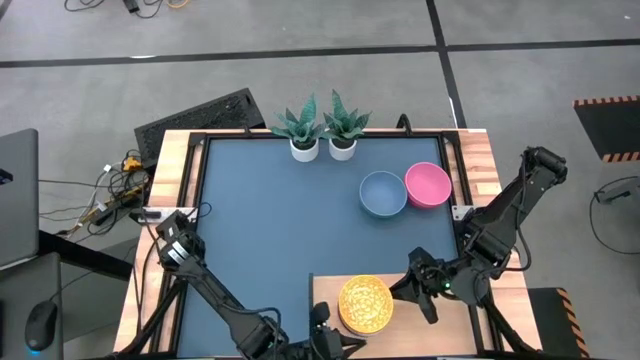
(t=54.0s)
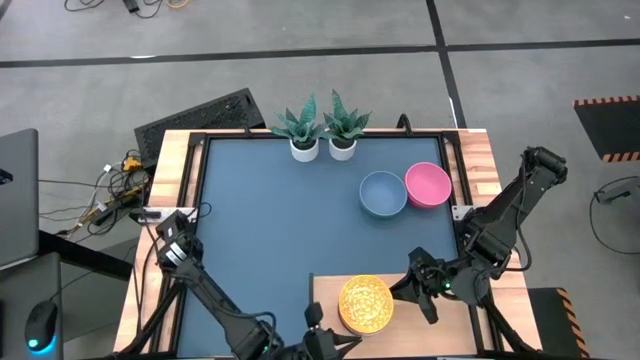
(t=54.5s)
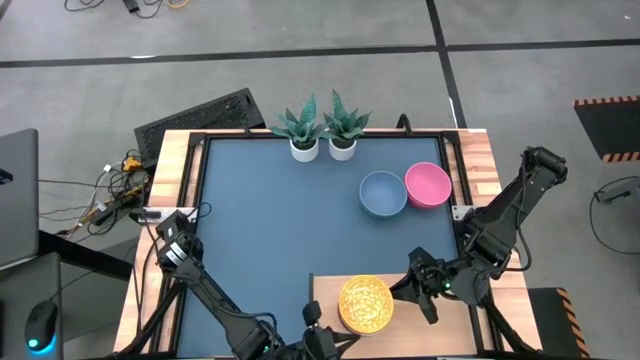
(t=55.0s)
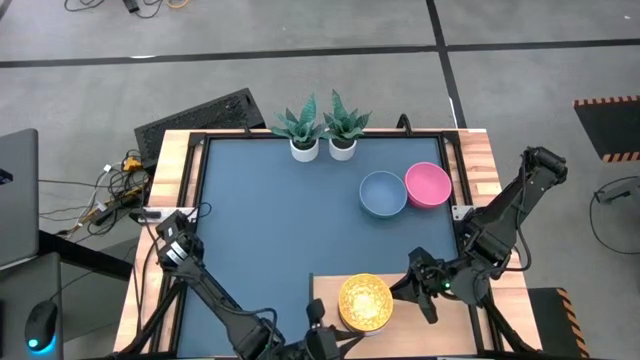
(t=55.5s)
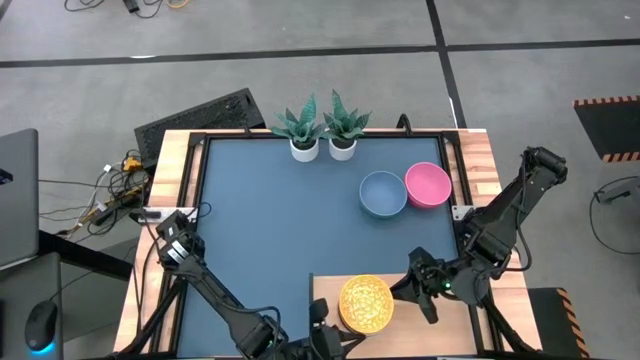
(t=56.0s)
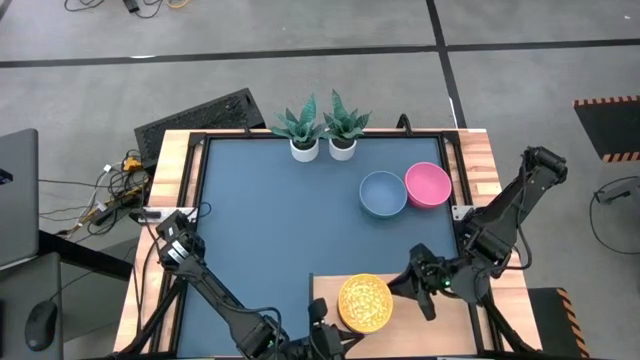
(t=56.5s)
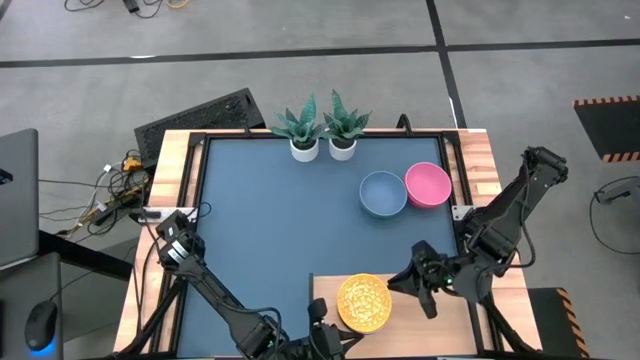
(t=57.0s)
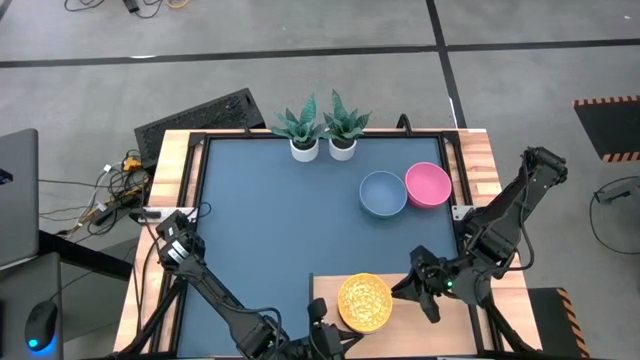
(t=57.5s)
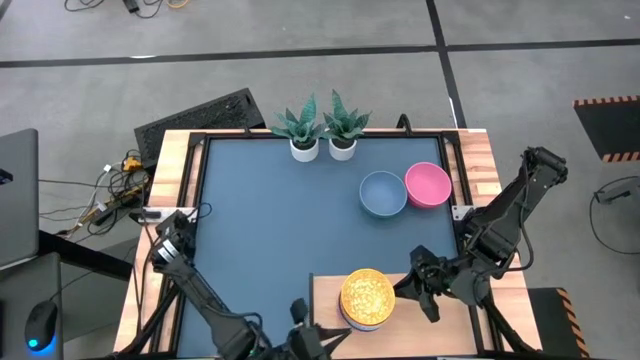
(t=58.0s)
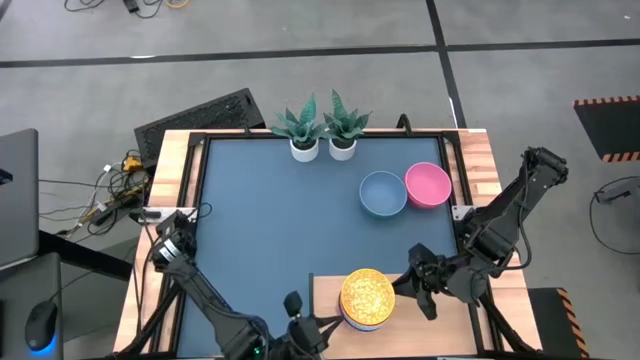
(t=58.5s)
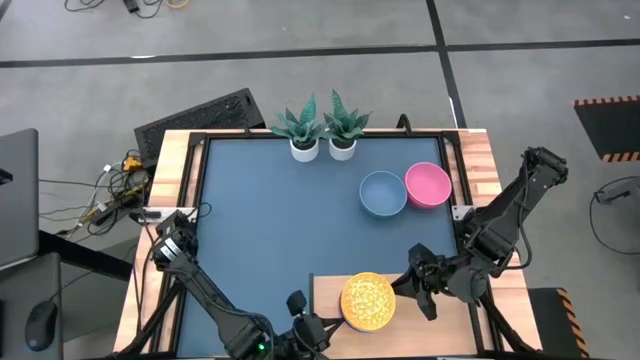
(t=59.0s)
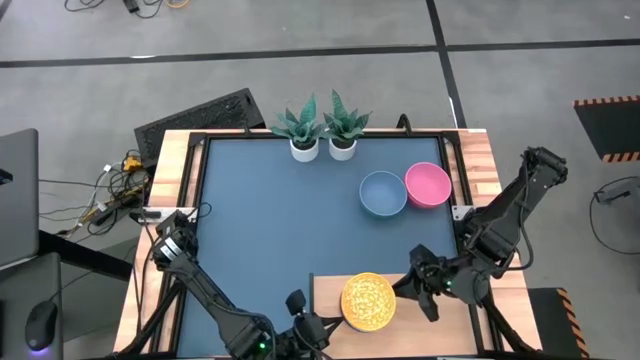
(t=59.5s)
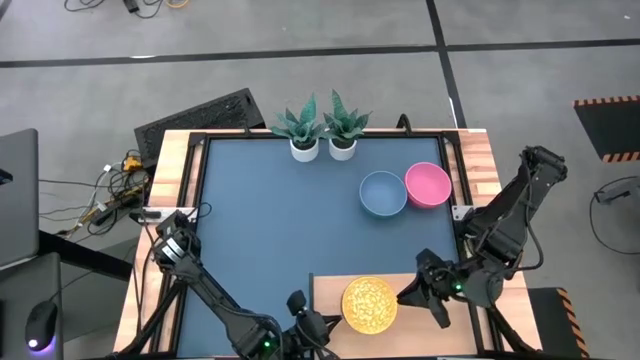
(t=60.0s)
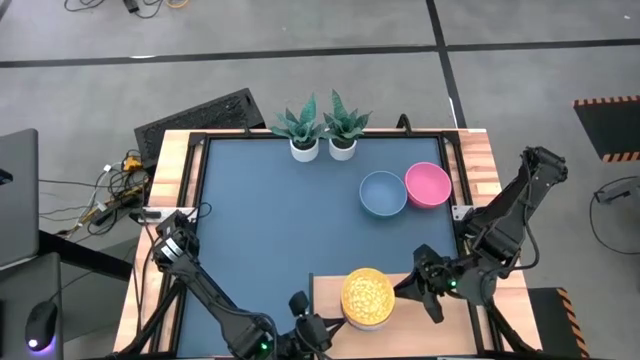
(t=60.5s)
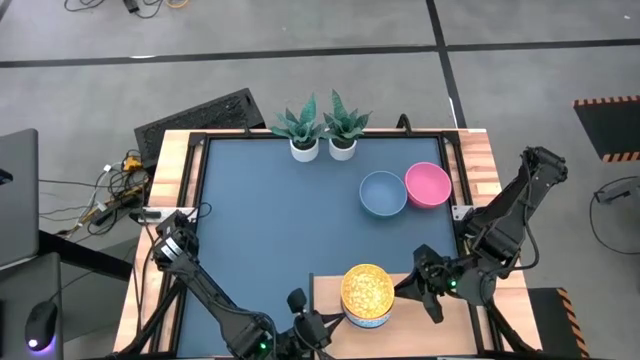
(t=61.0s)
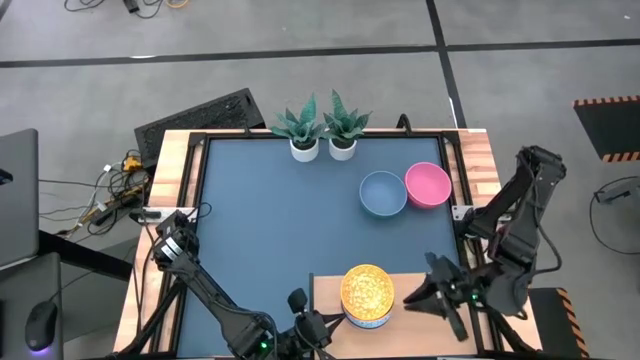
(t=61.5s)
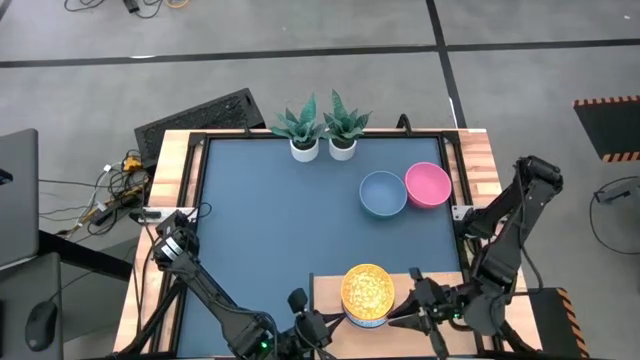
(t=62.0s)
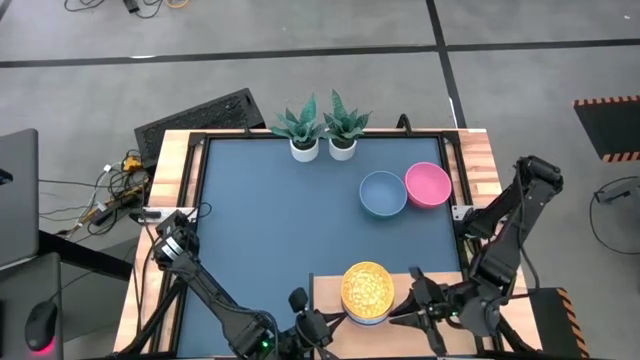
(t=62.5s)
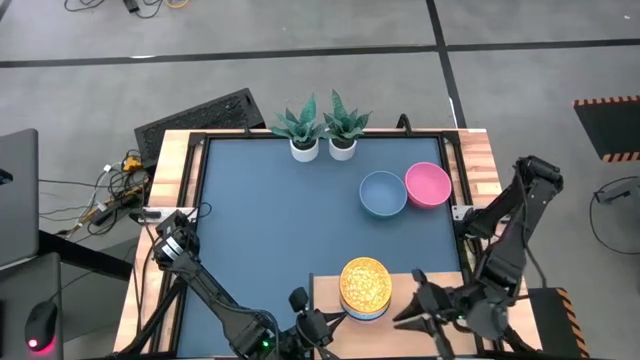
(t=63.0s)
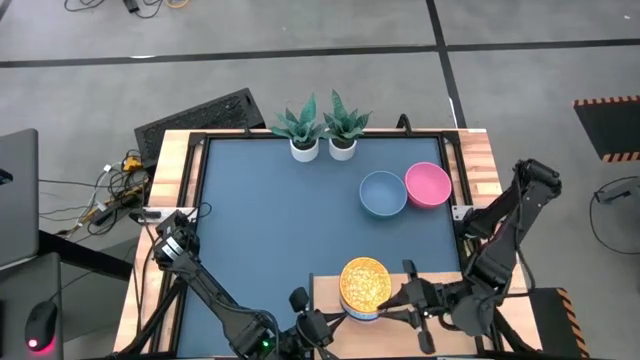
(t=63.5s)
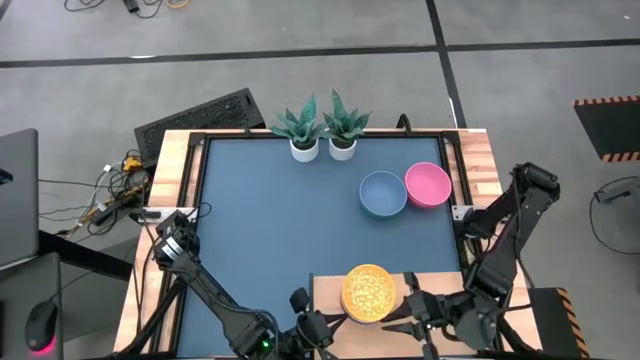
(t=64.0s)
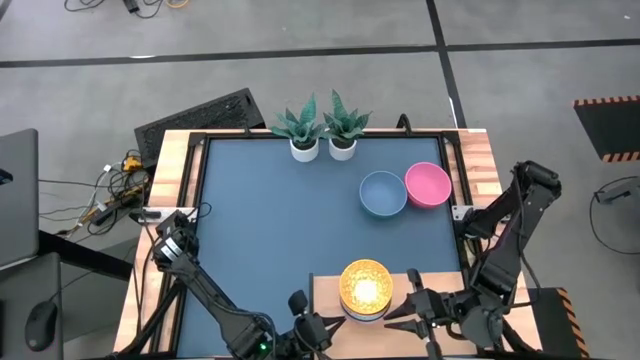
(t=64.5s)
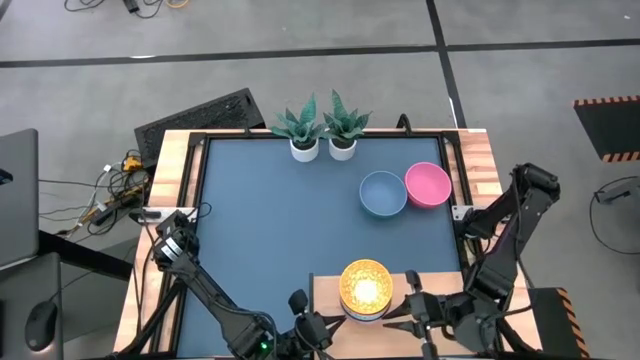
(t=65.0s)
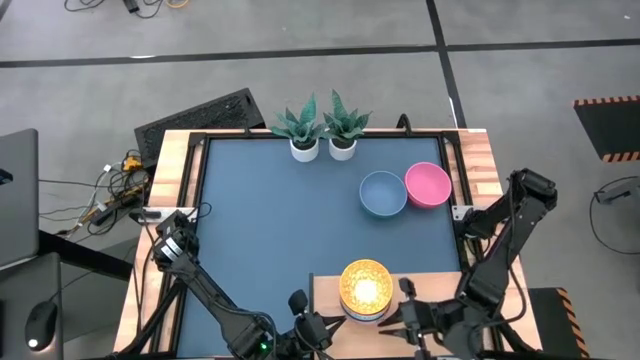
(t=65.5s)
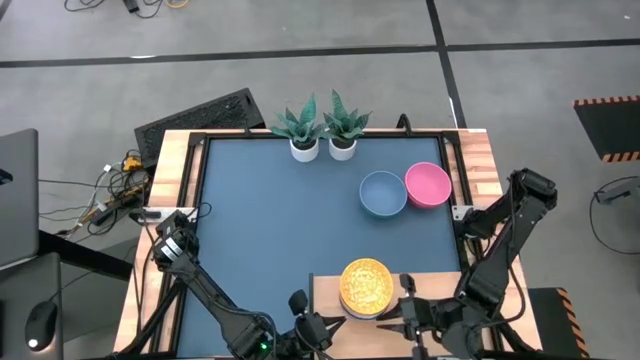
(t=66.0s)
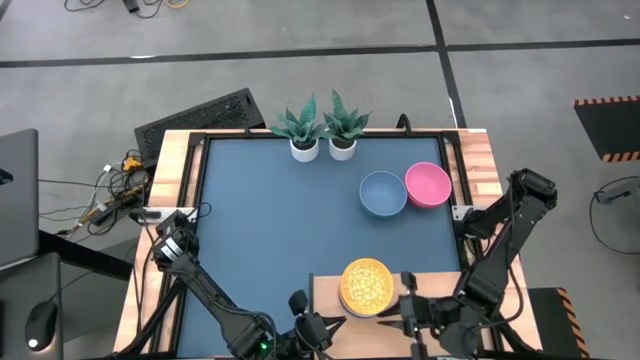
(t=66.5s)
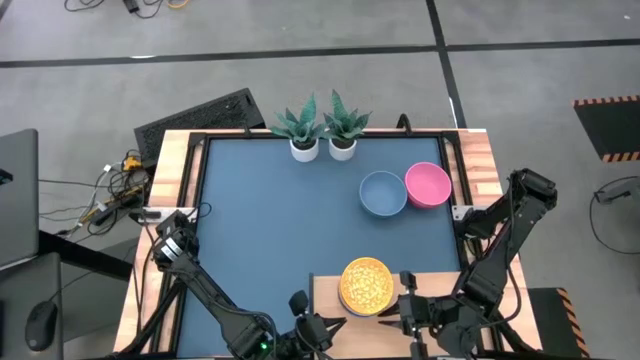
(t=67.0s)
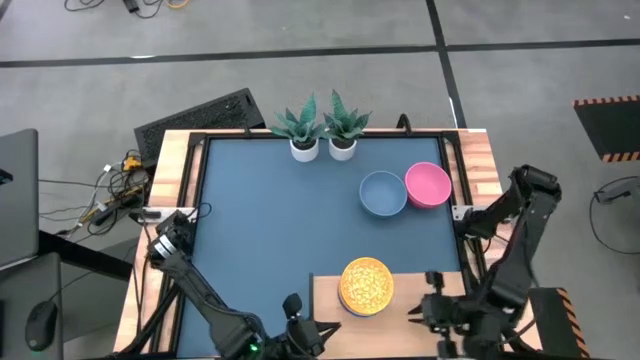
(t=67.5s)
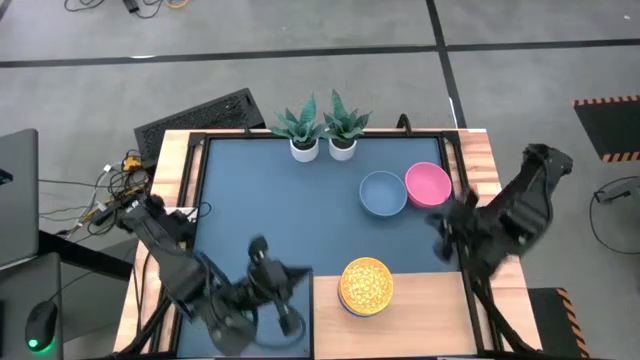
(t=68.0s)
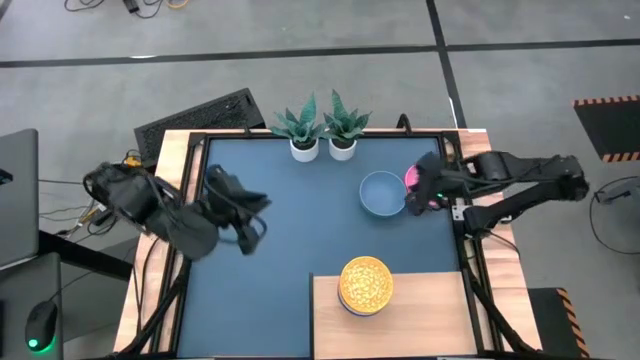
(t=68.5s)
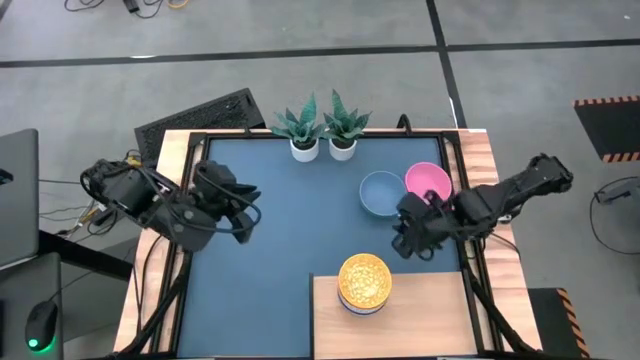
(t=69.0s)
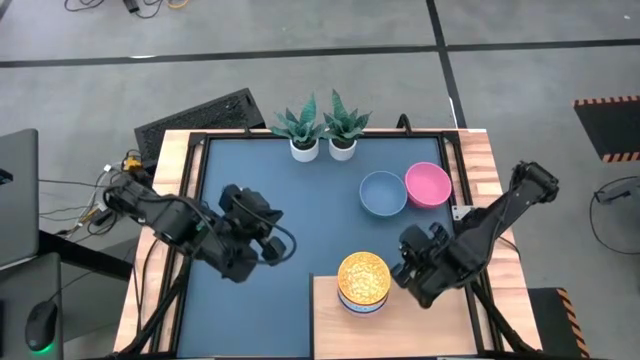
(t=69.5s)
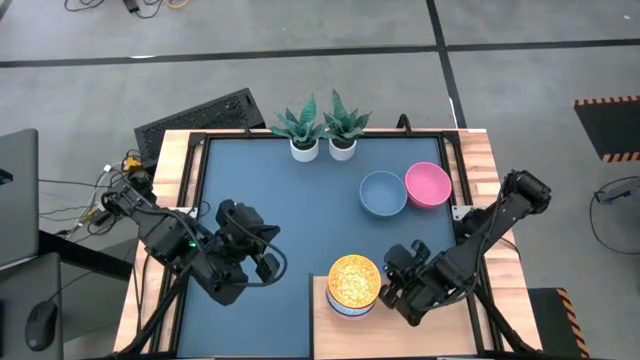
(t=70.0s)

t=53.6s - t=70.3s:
Task: Place and stack bowls onto a shelf
Adjust the stacked bowls on the shelf

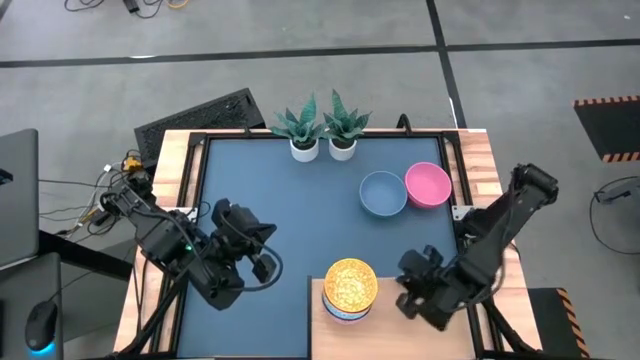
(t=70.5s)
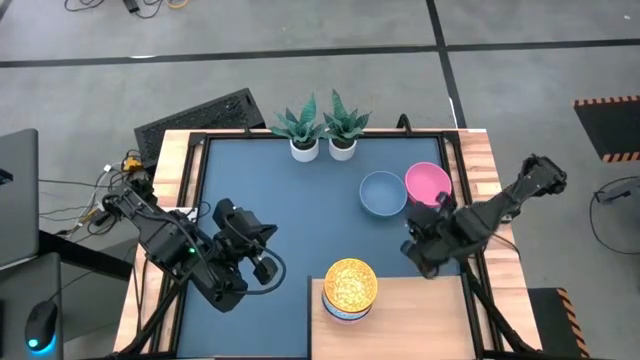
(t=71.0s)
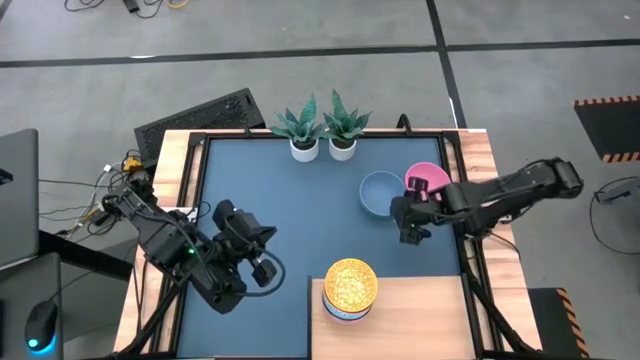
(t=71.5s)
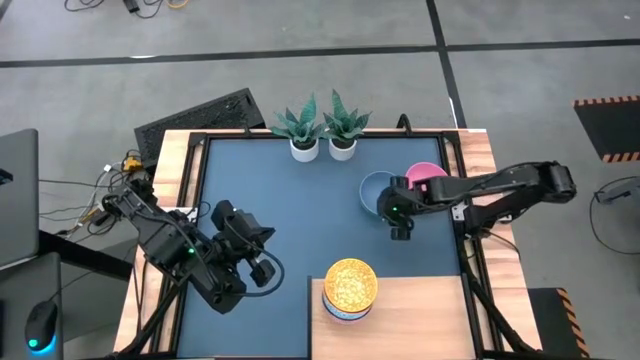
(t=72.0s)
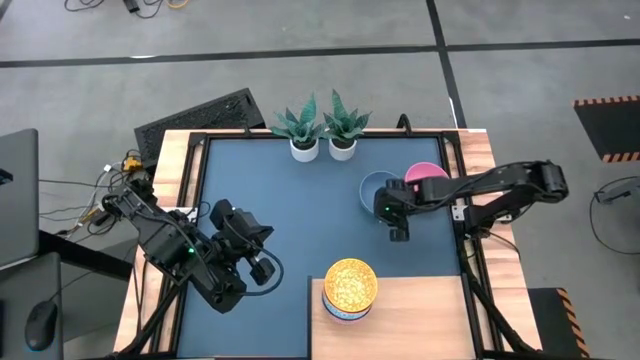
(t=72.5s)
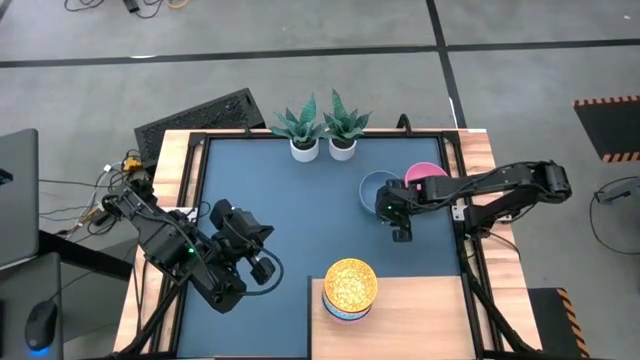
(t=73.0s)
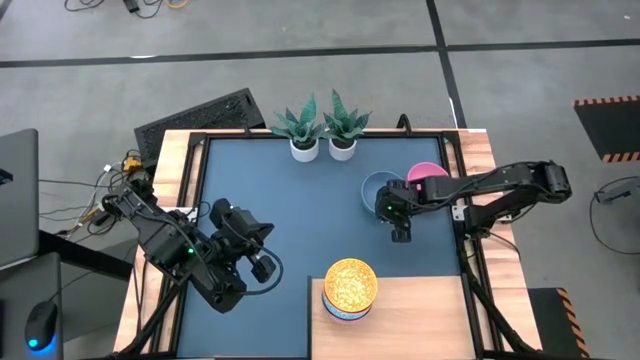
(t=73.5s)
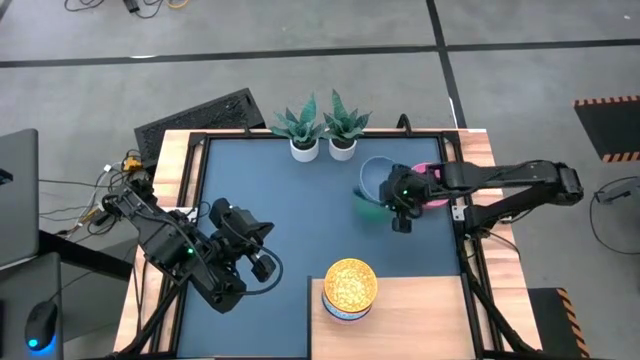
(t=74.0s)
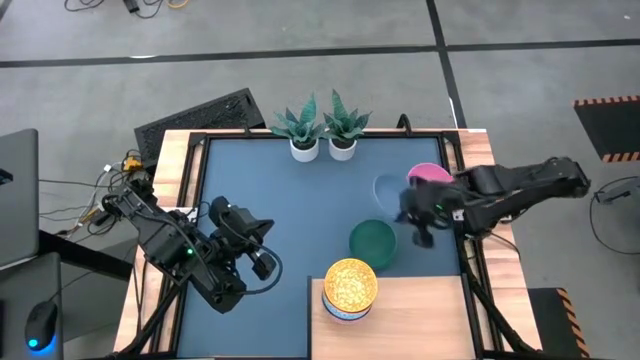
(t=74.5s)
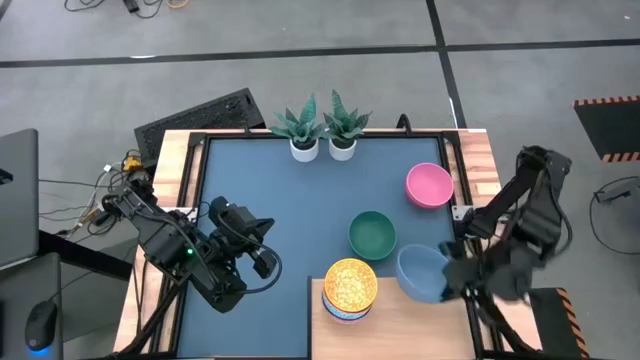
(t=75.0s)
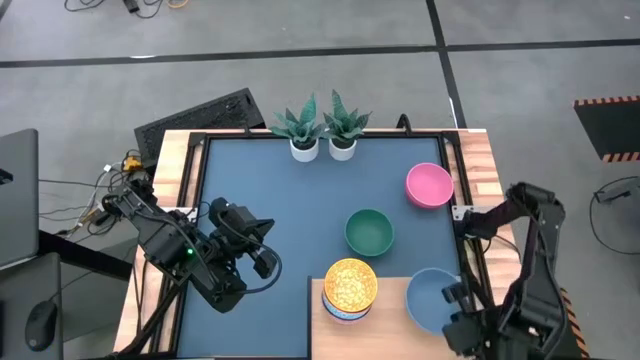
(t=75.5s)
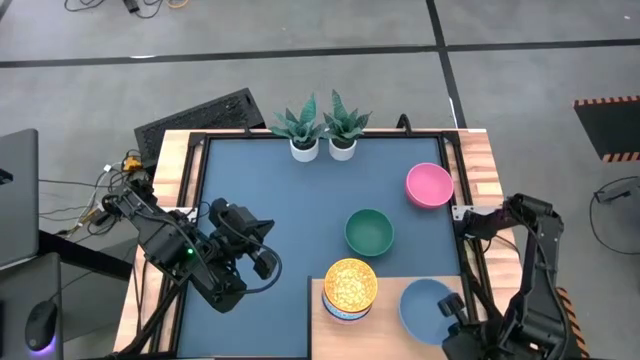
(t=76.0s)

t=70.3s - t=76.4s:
Put the blue bowl on the shelf
